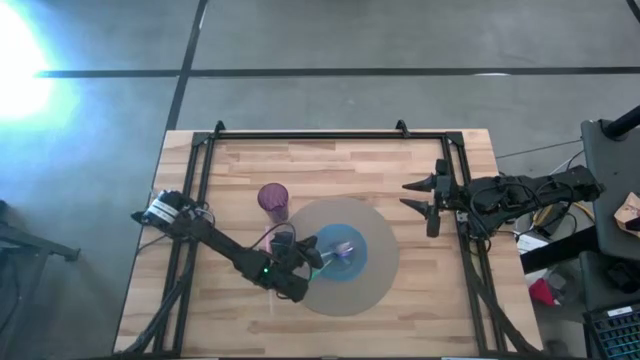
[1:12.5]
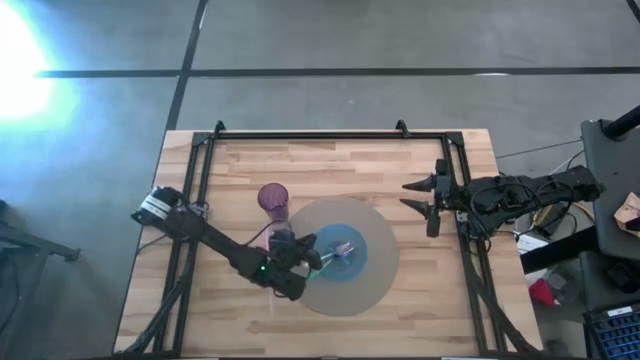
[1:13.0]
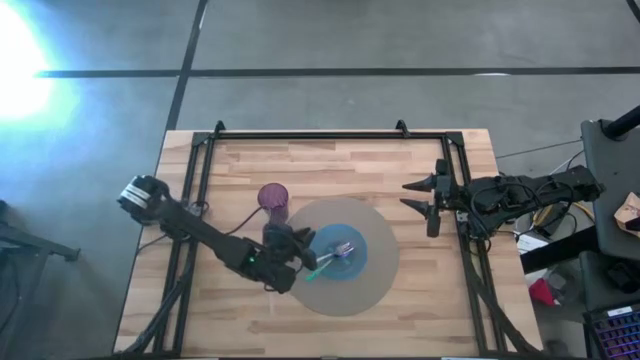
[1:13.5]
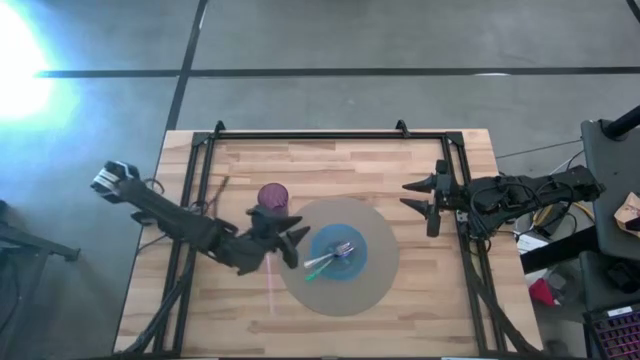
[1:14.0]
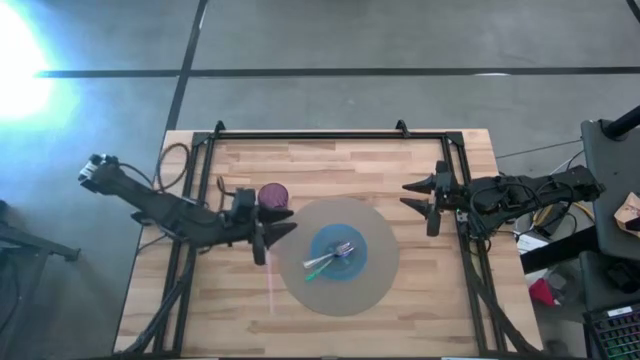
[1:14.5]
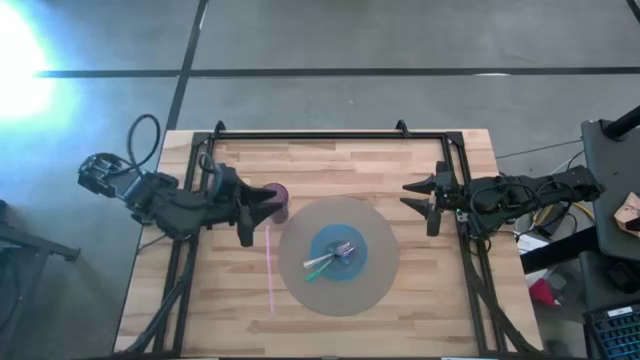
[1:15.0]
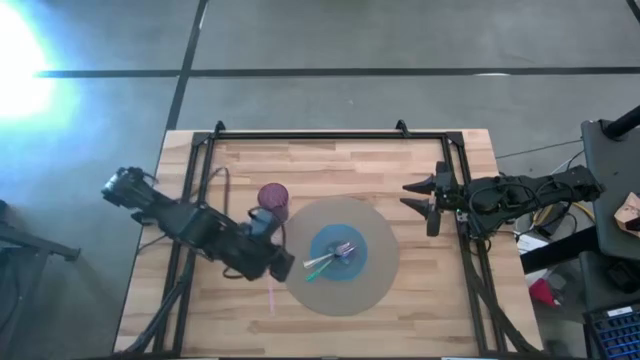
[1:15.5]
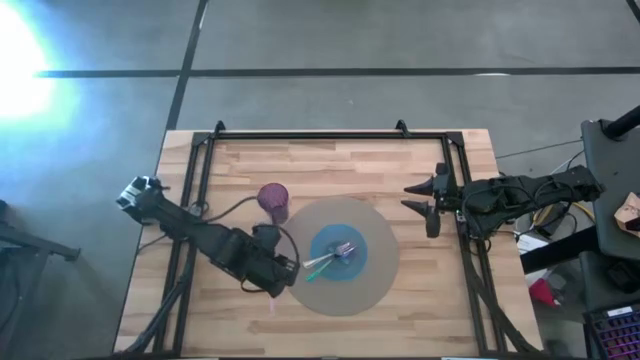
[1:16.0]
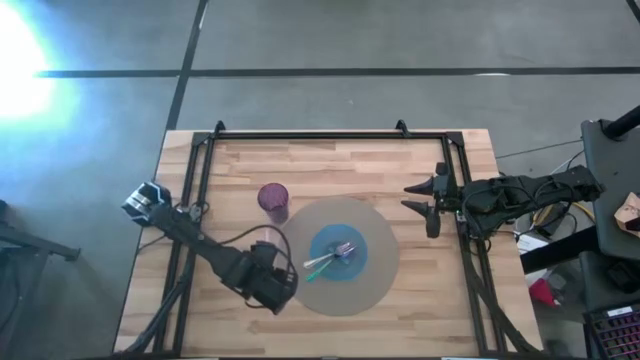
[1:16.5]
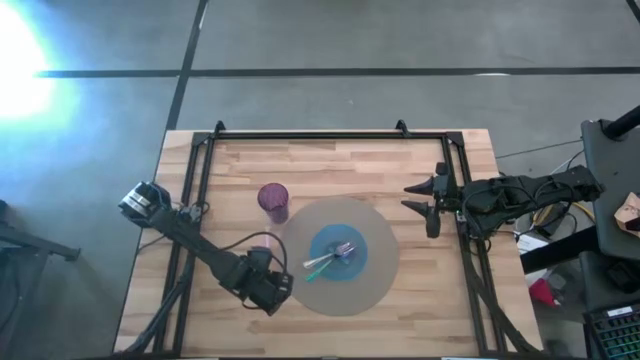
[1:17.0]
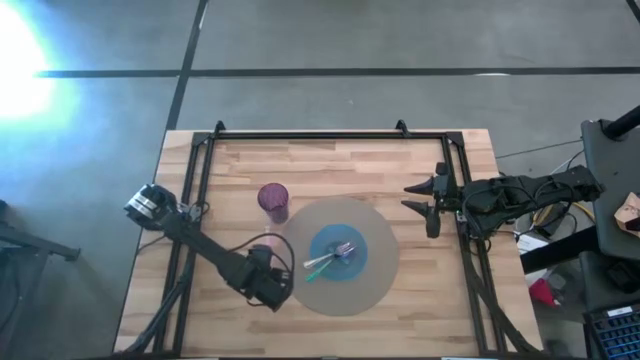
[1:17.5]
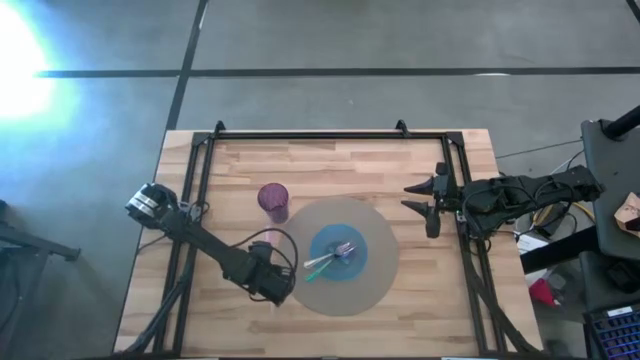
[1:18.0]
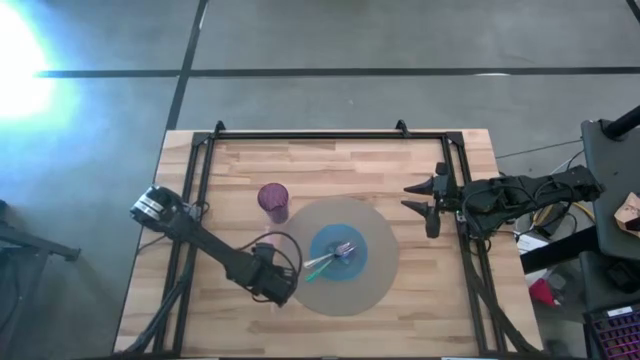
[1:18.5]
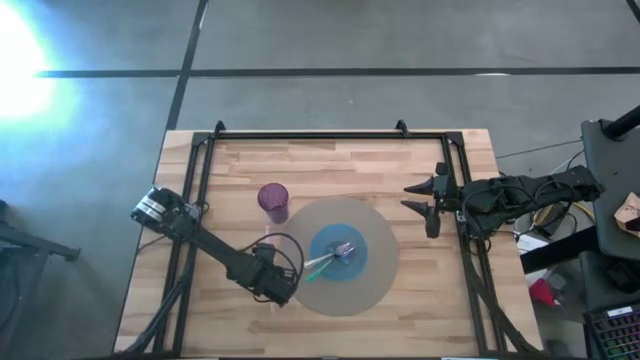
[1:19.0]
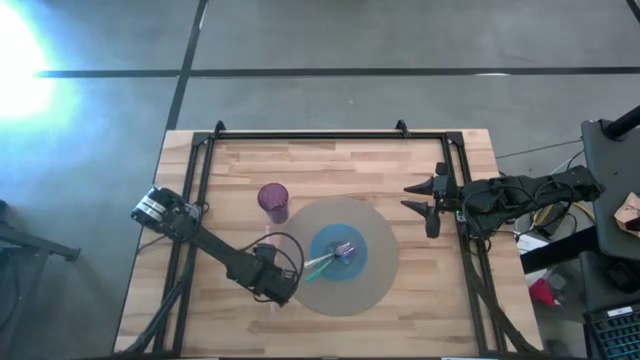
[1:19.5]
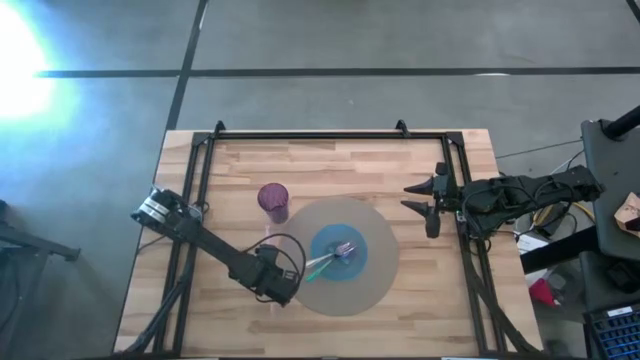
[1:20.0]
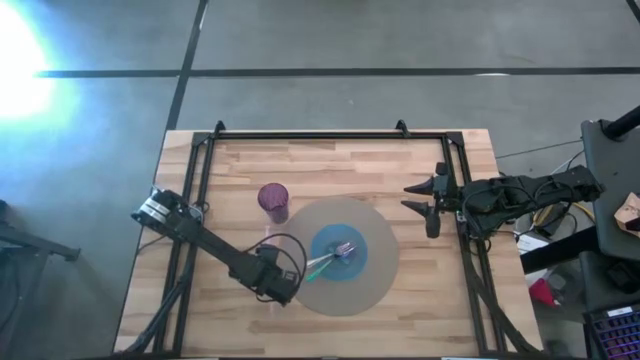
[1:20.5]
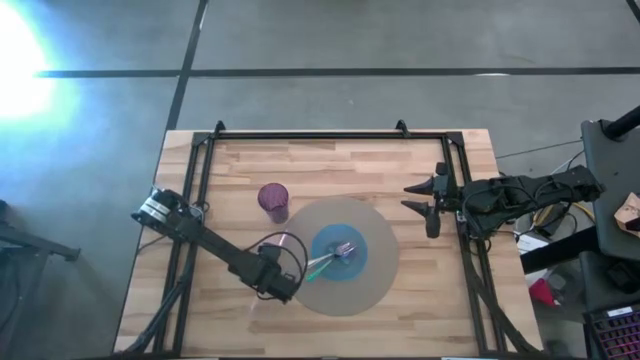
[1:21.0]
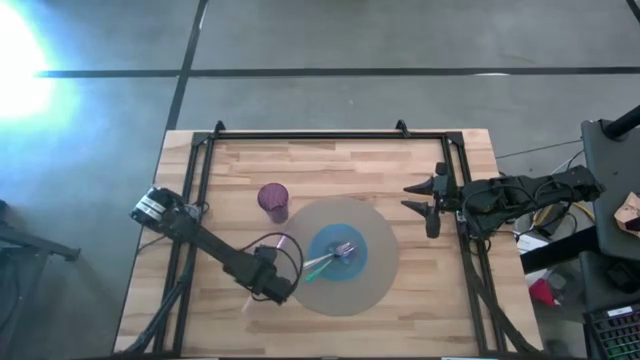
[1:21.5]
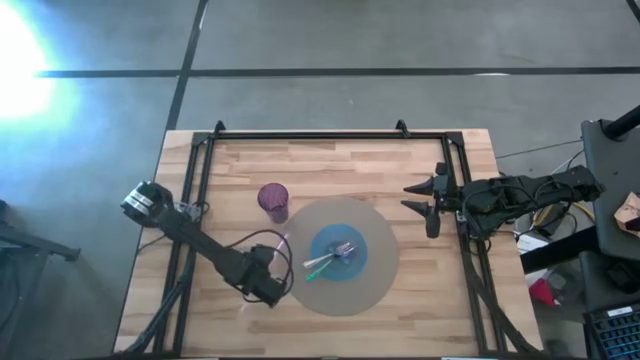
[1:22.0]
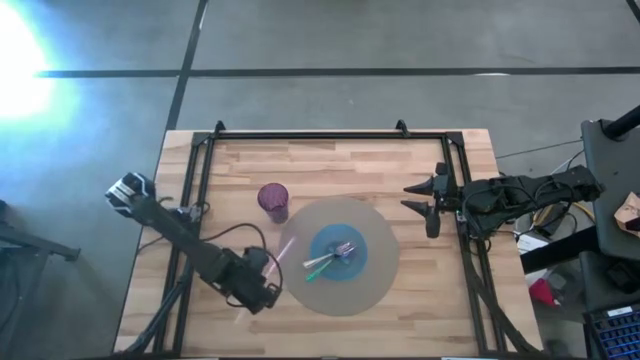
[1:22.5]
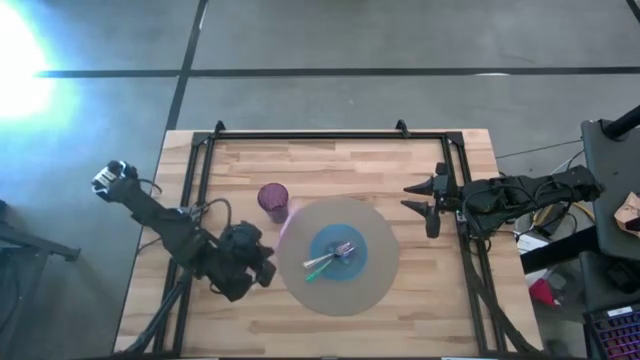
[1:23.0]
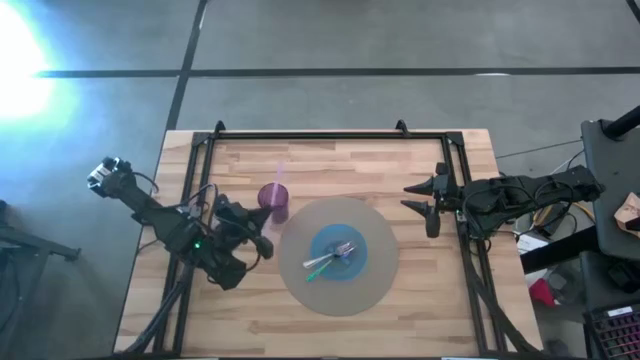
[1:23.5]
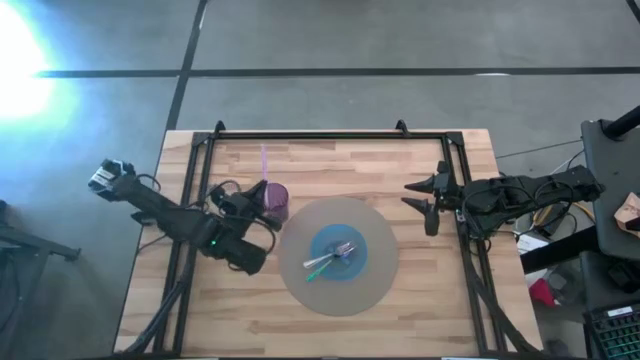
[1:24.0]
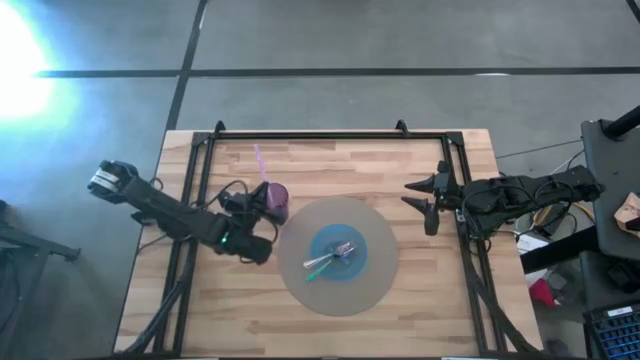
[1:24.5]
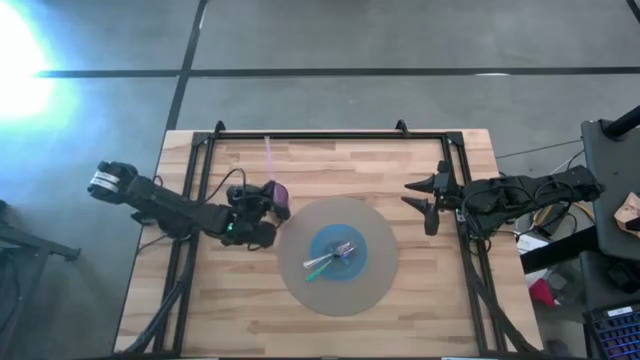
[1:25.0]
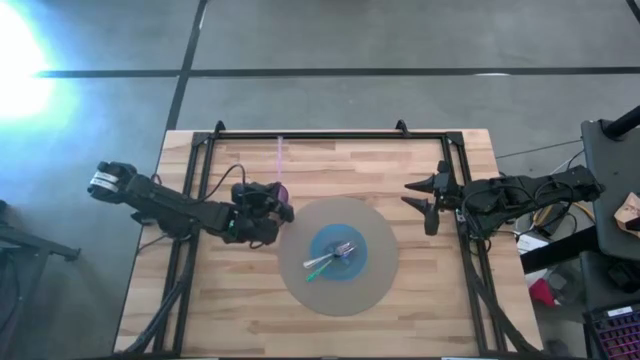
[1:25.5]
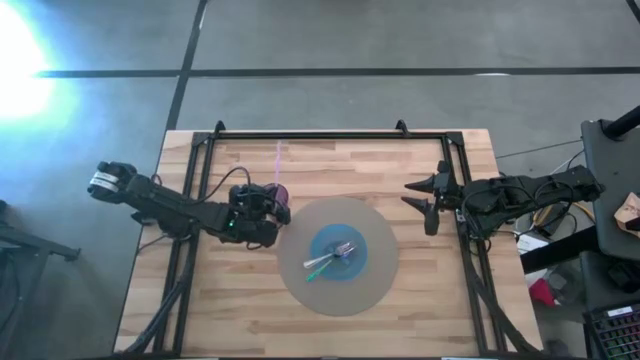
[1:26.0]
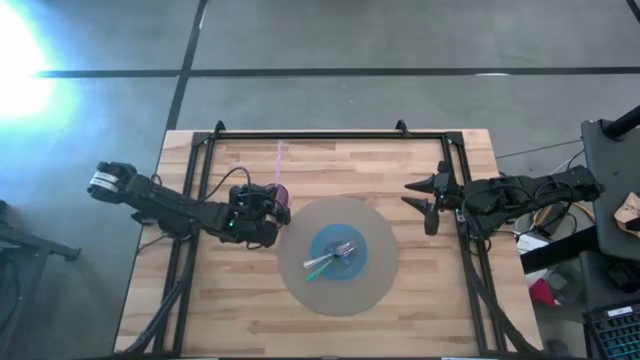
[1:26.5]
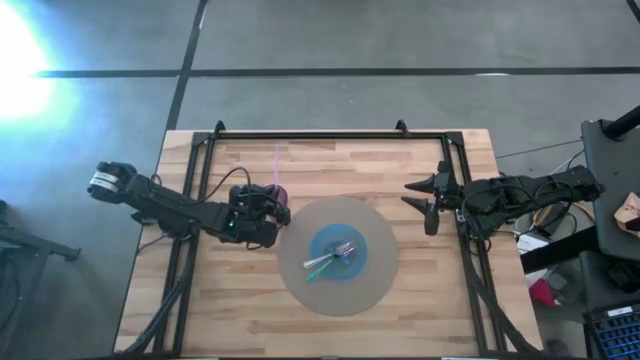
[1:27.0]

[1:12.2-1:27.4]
Task: Pick & Place Utensil
Put the straw in the violet cup

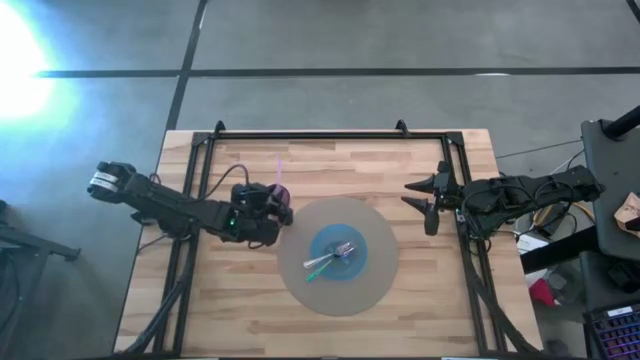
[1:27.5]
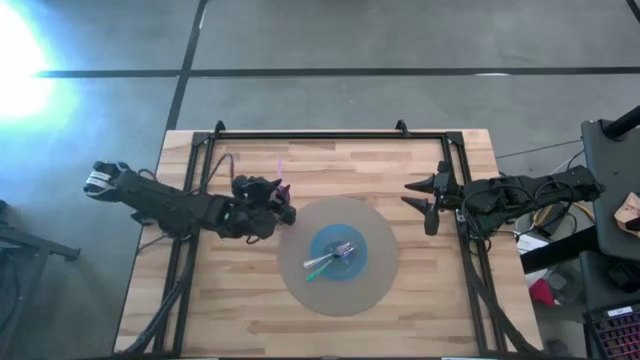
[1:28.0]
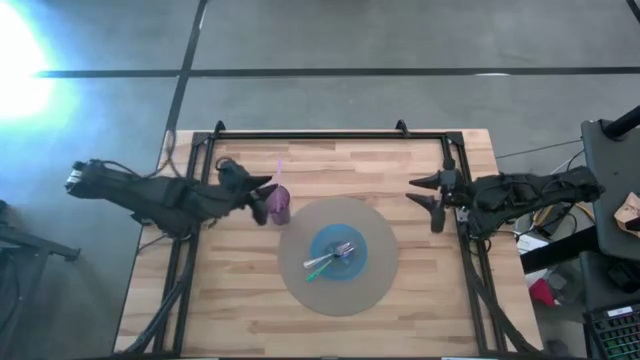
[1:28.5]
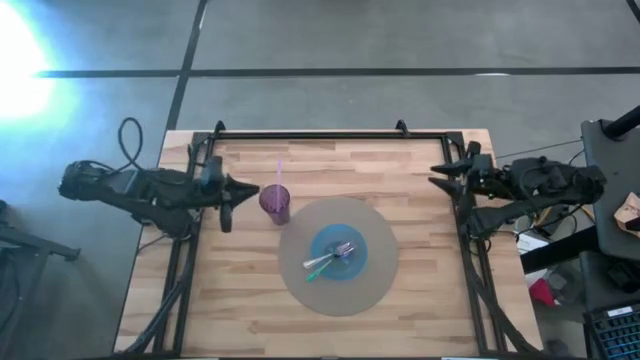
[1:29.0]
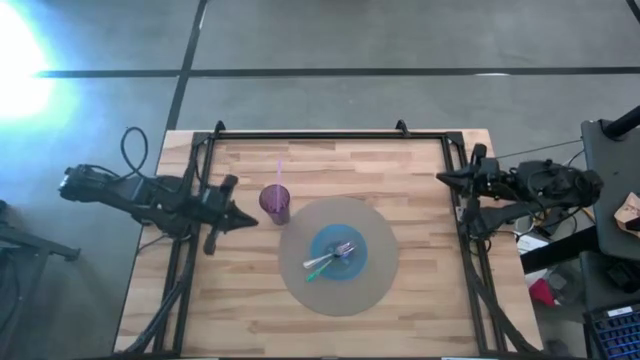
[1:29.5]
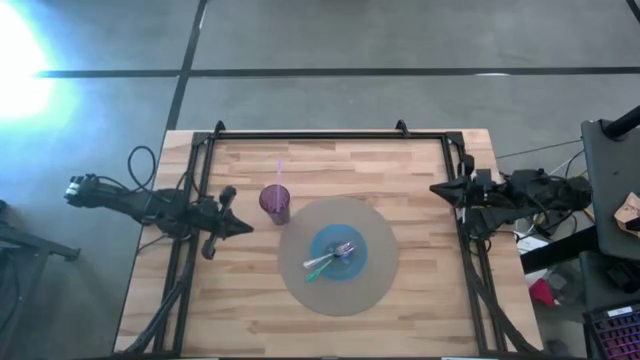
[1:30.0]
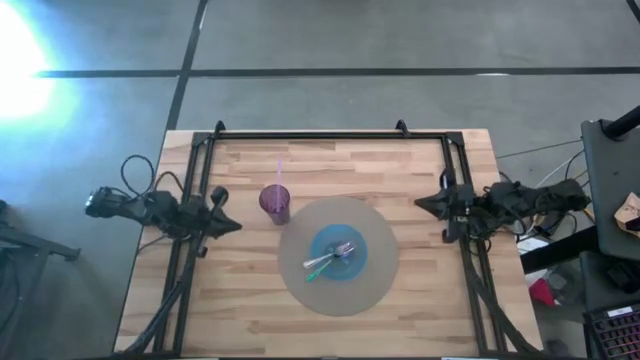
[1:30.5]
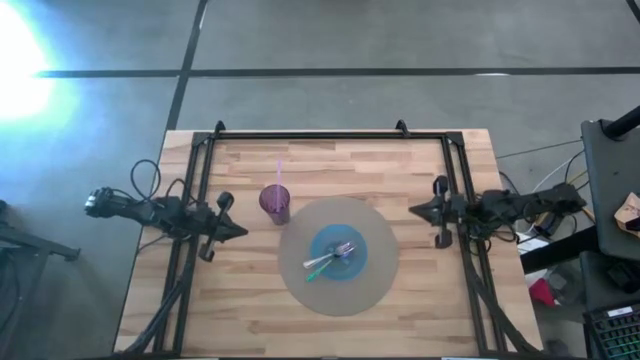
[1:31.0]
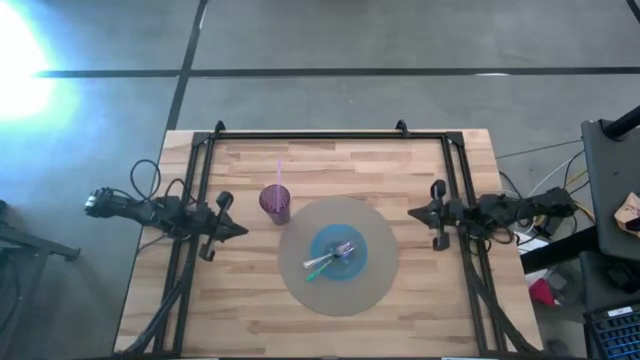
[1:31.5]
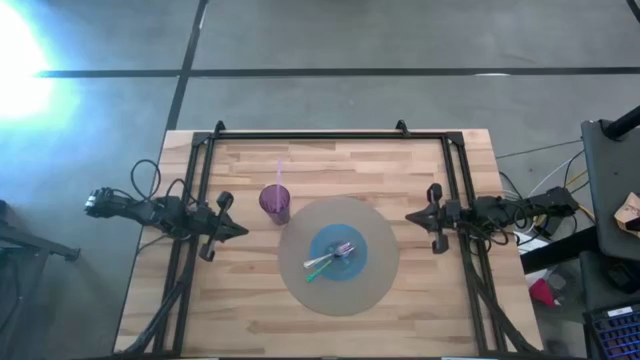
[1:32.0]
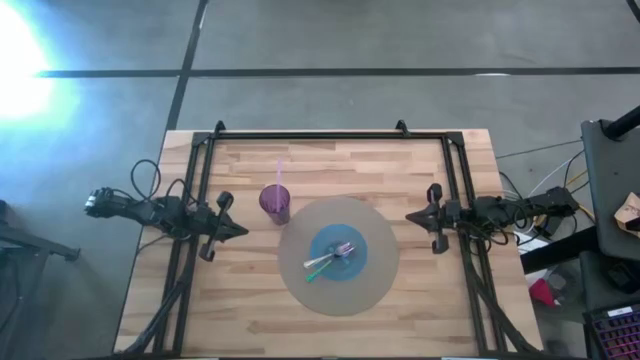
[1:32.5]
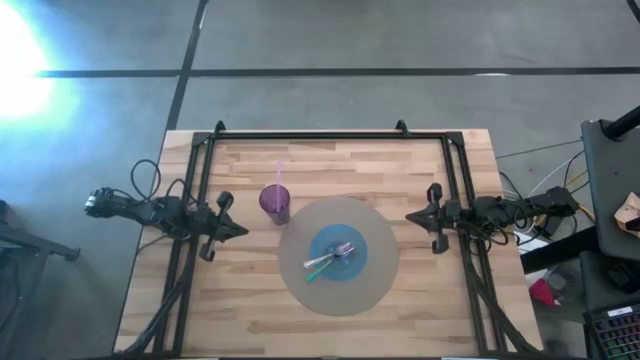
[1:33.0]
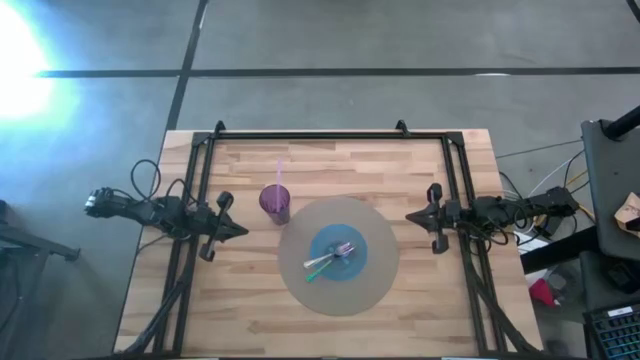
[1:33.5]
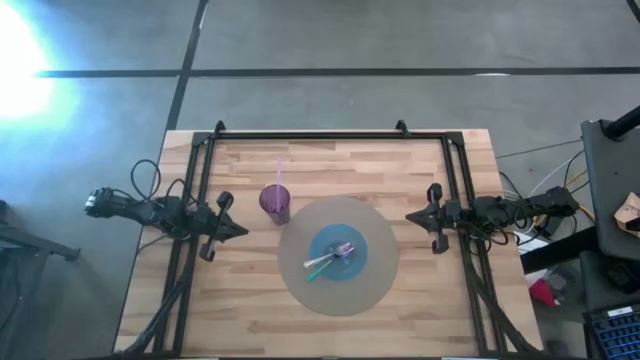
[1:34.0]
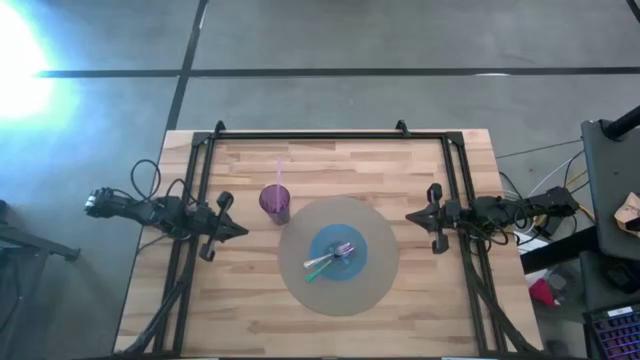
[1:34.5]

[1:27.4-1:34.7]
Return to Home Position
